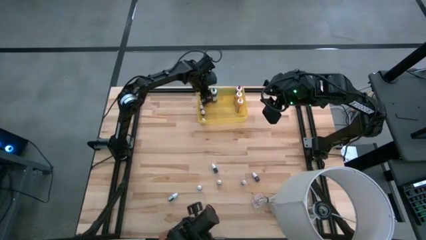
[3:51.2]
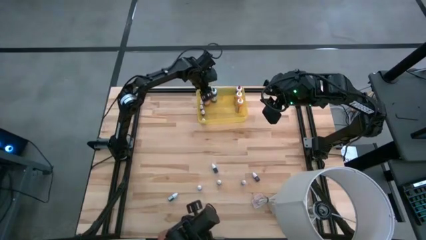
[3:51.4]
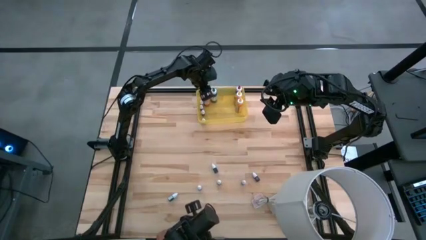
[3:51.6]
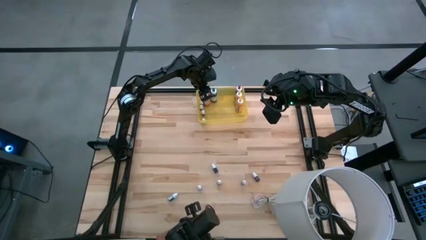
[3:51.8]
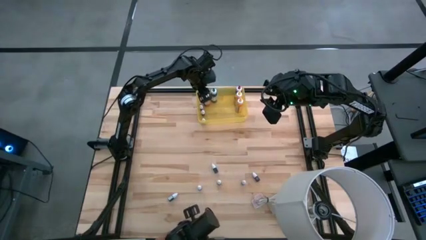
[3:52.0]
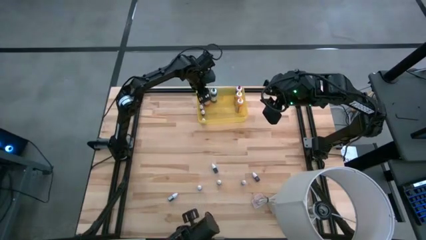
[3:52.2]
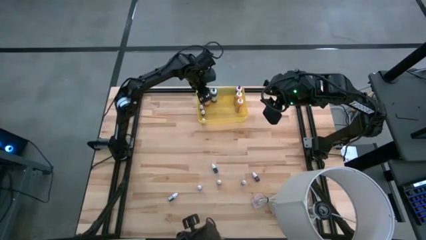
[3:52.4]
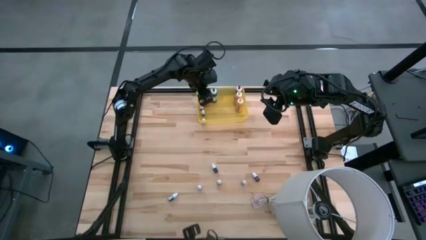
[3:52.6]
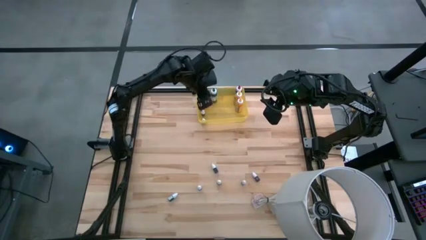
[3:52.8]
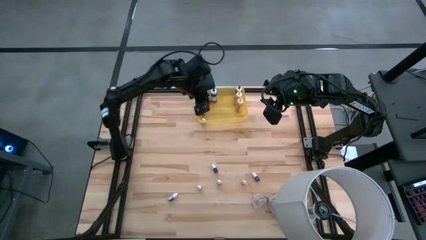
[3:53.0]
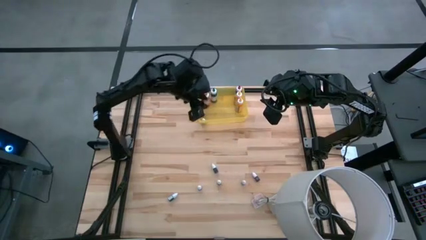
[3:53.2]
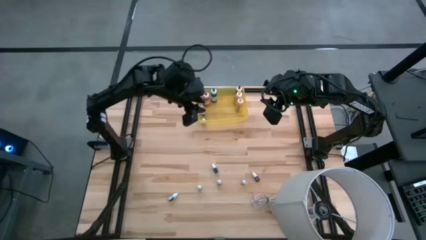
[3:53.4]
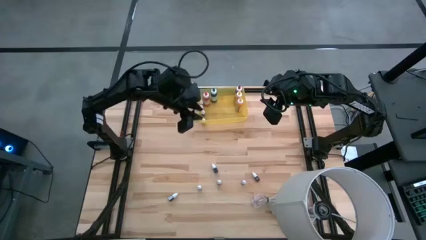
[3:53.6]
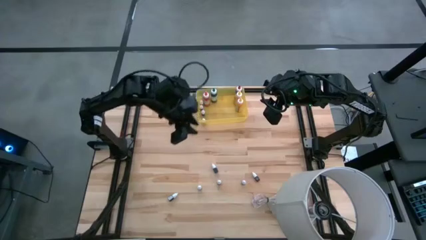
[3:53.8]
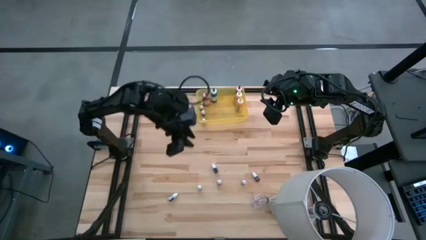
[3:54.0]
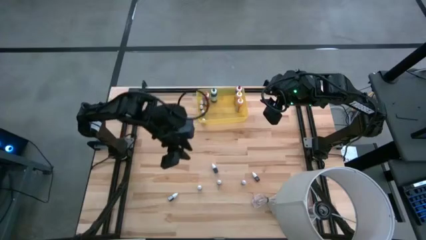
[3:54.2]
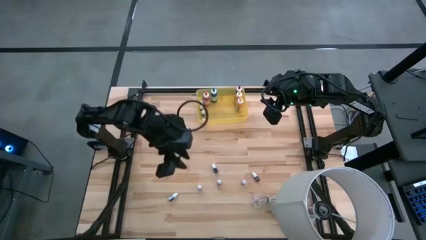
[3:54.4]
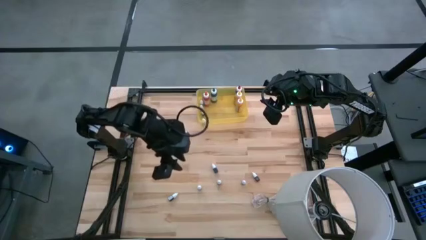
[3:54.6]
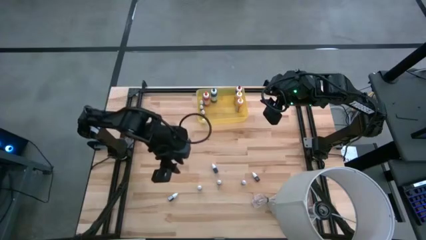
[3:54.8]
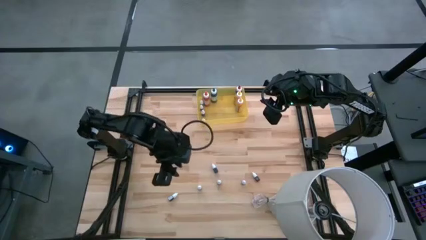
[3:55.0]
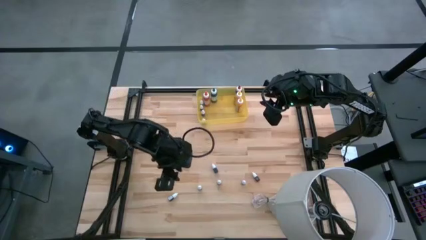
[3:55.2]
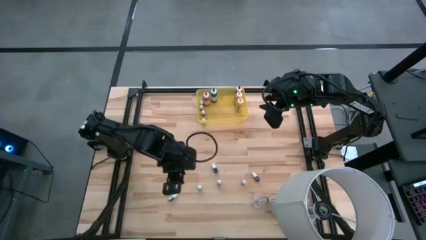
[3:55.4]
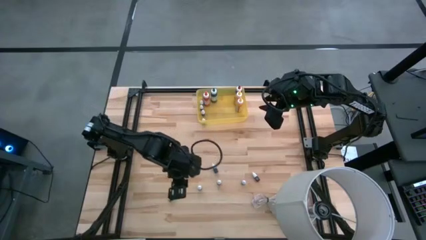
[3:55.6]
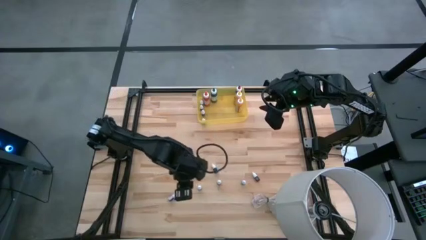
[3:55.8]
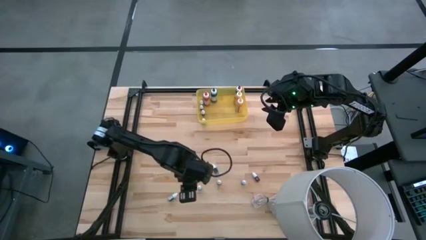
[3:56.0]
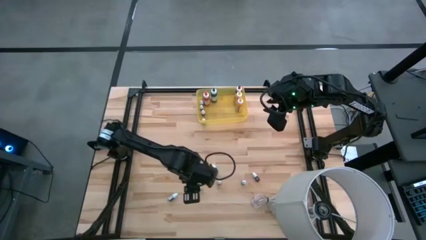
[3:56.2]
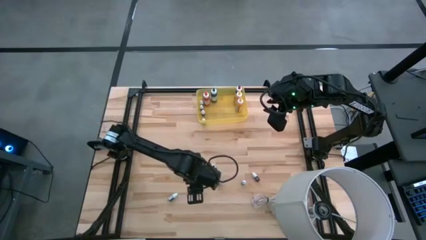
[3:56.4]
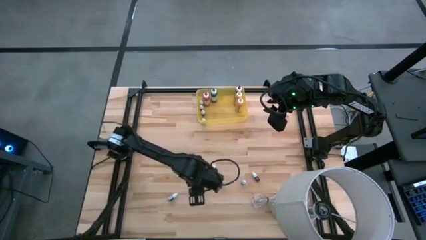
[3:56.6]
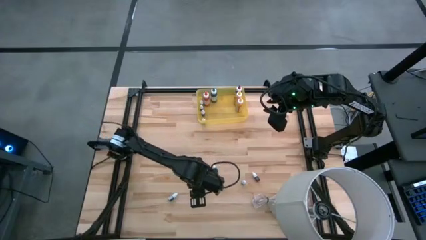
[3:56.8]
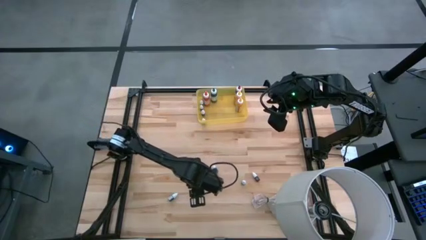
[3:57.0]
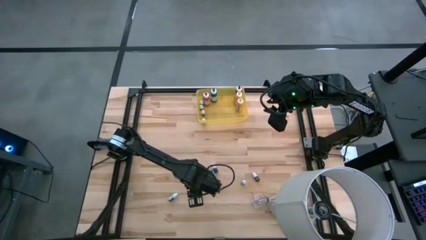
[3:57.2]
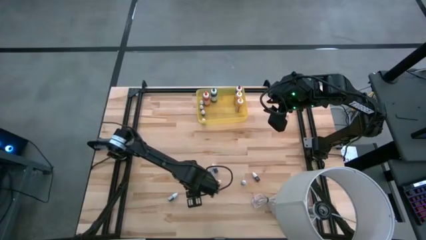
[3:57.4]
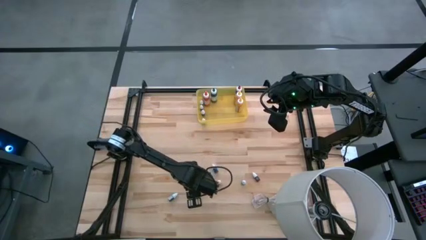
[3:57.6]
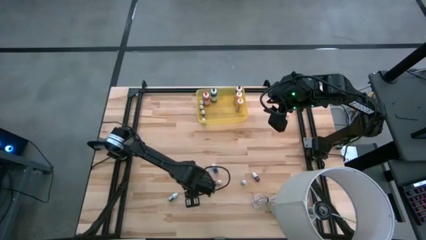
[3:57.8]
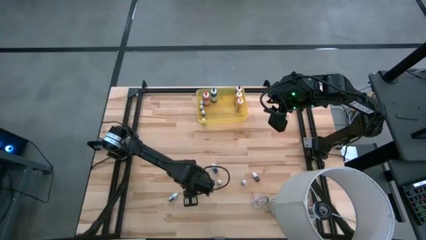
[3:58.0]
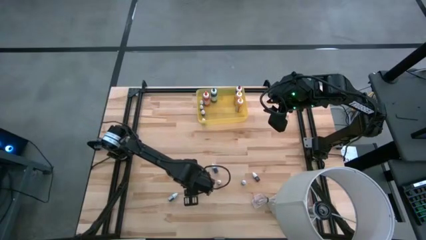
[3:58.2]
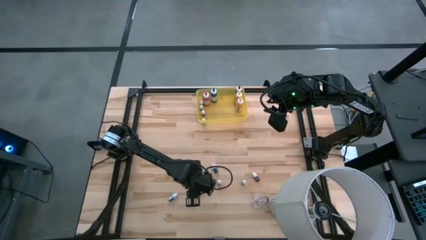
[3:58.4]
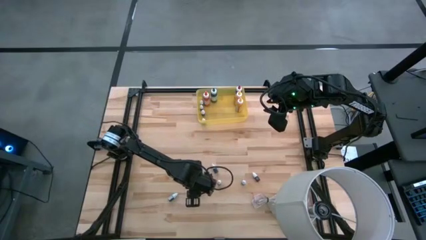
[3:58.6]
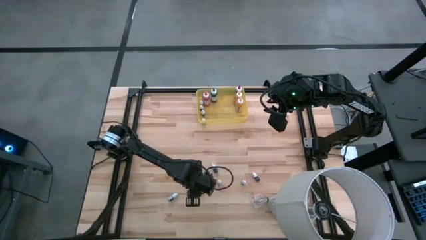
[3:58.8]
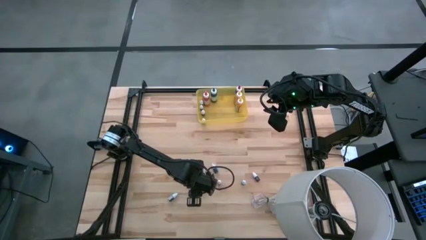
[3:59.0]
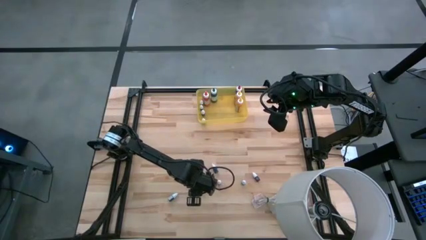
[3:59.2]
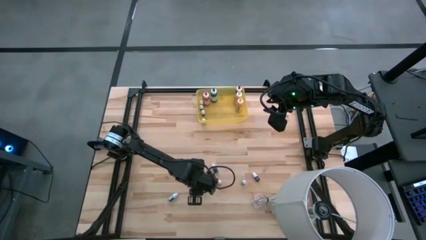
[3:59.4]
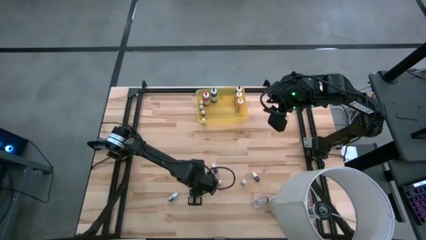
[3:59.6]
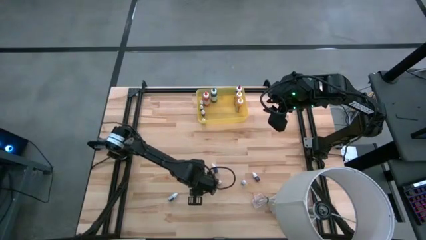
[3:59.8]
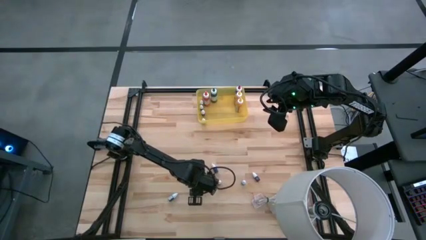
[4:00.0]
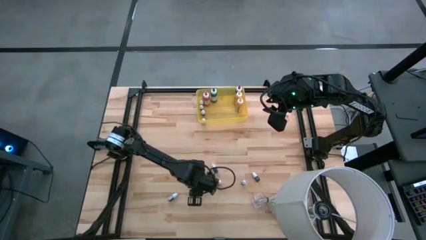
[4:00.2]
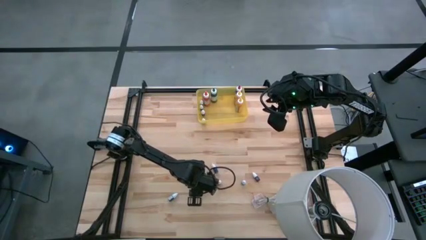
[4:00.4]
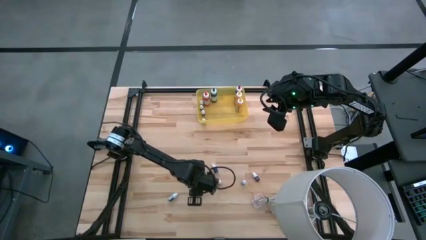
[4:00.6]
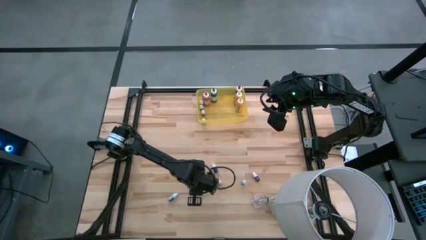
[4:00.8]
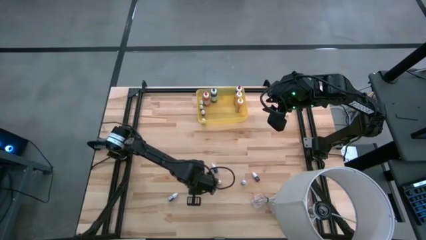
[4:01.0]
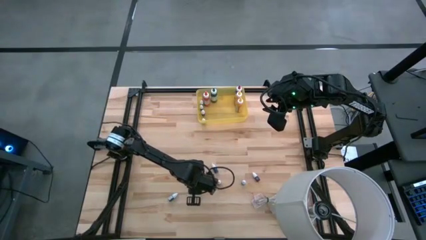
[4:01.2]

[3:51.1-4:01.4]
Task: Pick & Place food coloring
Put the small pink food coloring bottle into the yellow bin
